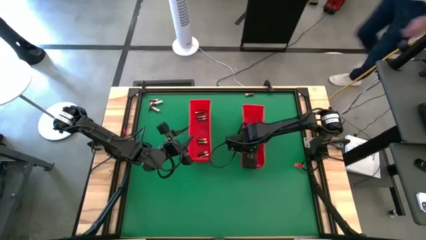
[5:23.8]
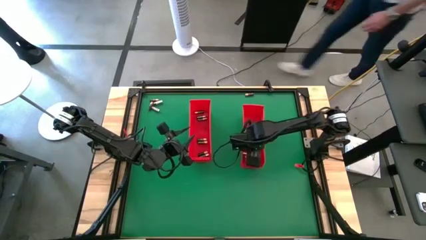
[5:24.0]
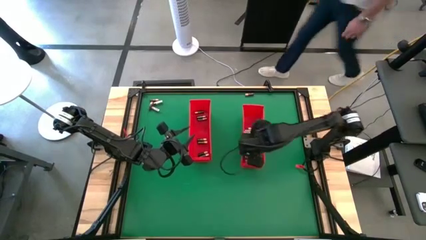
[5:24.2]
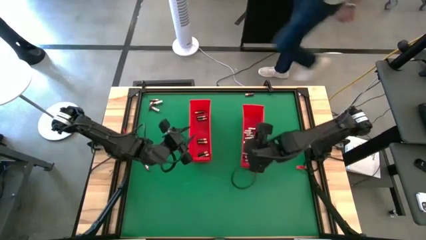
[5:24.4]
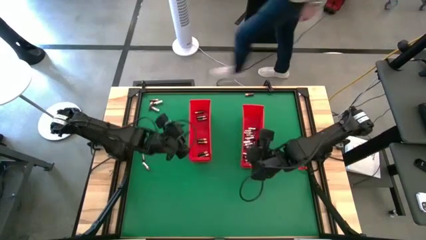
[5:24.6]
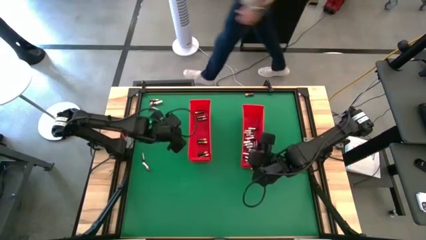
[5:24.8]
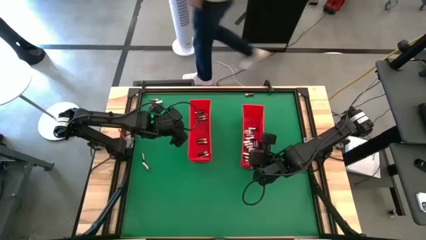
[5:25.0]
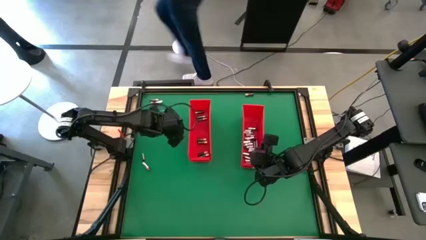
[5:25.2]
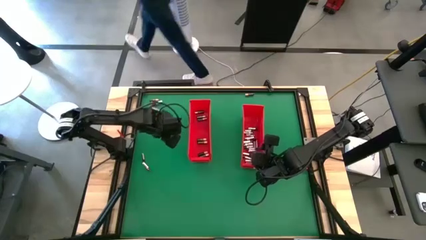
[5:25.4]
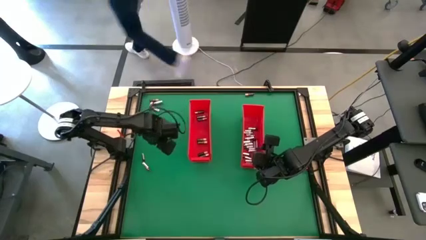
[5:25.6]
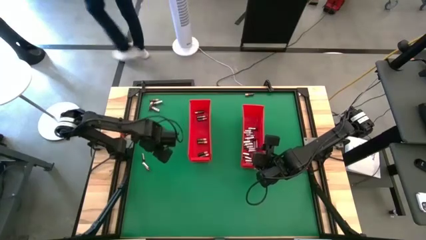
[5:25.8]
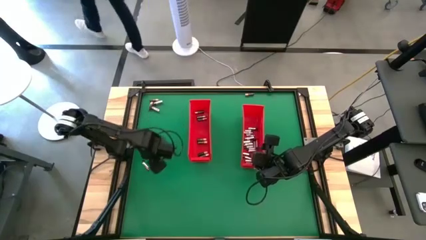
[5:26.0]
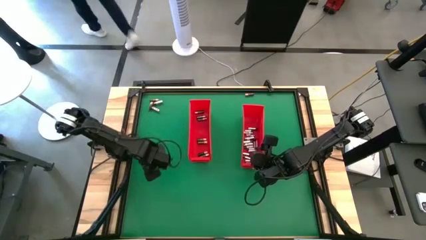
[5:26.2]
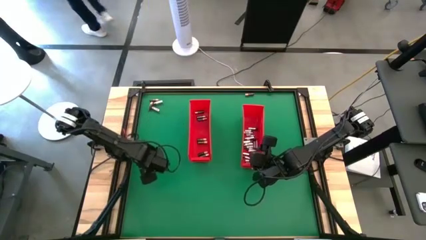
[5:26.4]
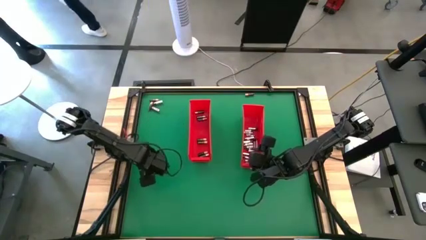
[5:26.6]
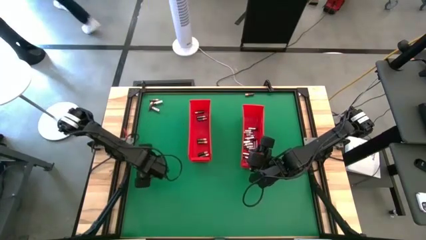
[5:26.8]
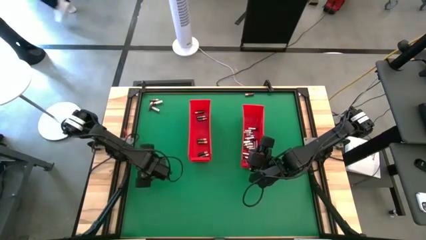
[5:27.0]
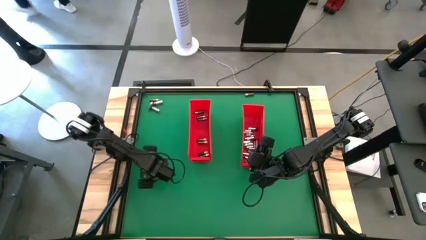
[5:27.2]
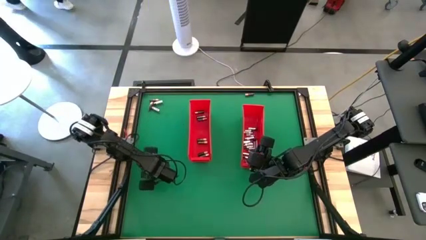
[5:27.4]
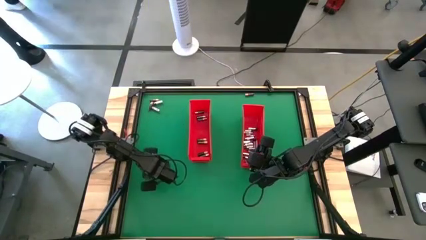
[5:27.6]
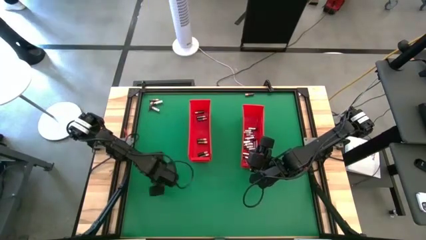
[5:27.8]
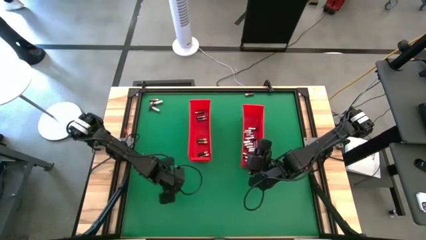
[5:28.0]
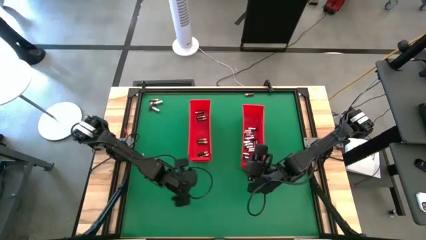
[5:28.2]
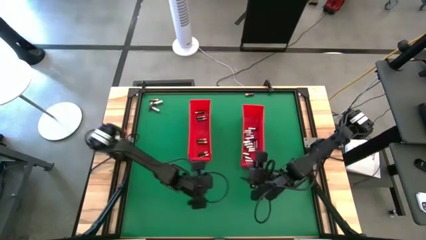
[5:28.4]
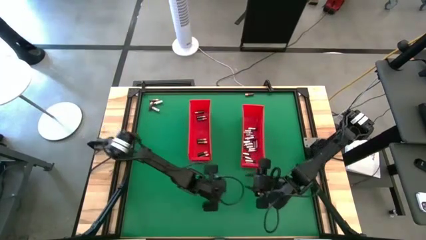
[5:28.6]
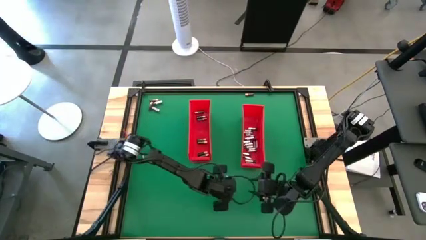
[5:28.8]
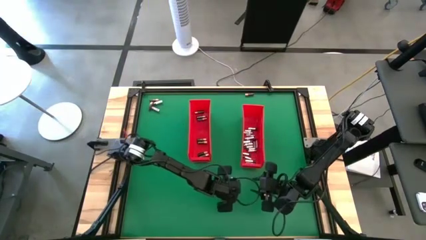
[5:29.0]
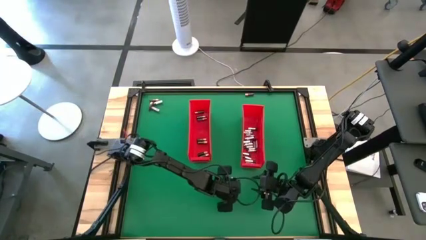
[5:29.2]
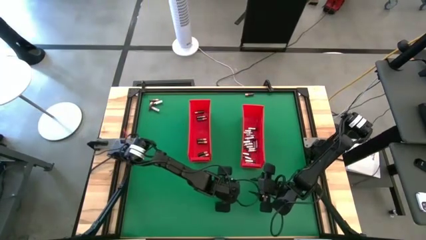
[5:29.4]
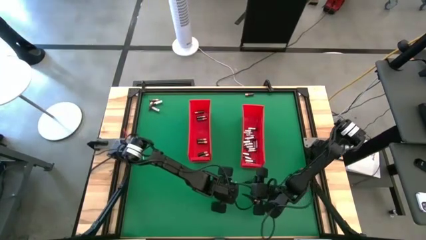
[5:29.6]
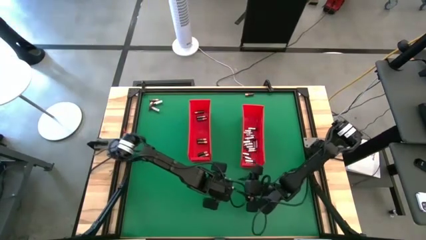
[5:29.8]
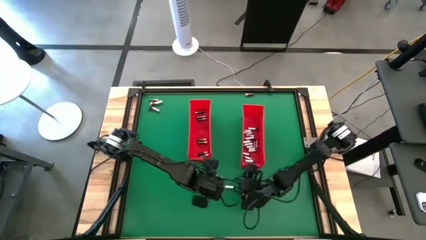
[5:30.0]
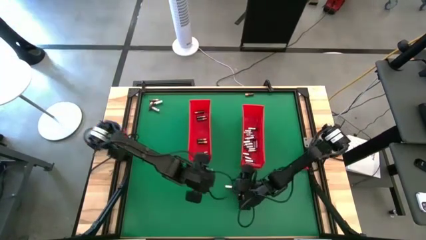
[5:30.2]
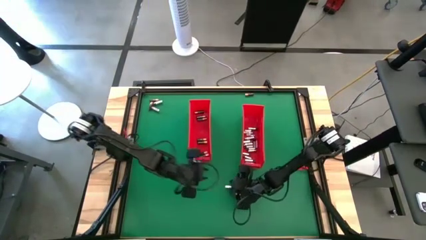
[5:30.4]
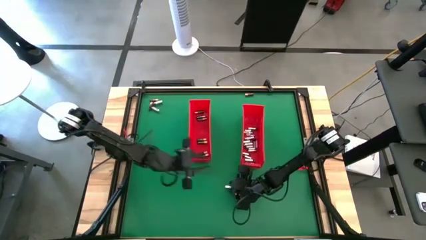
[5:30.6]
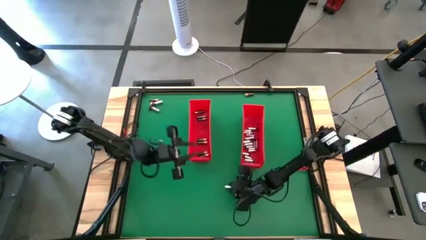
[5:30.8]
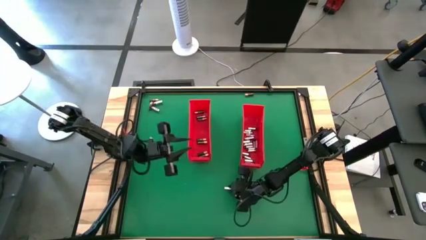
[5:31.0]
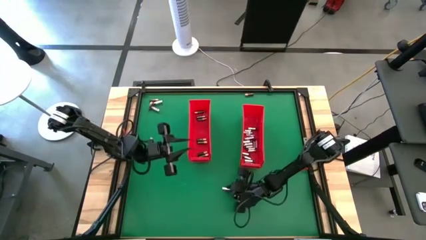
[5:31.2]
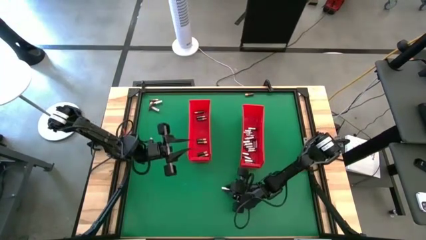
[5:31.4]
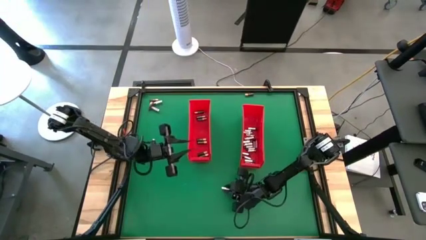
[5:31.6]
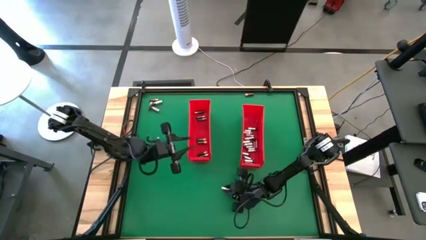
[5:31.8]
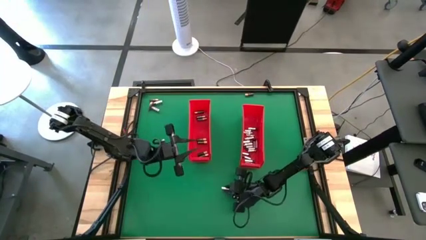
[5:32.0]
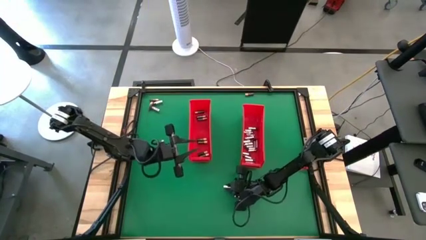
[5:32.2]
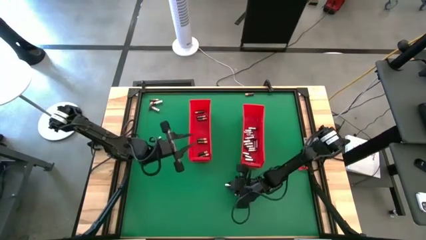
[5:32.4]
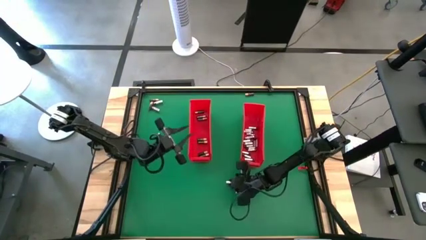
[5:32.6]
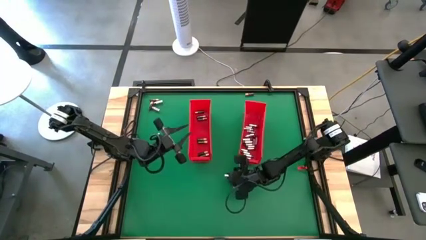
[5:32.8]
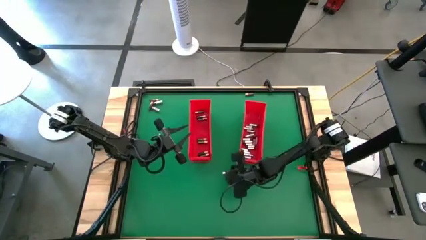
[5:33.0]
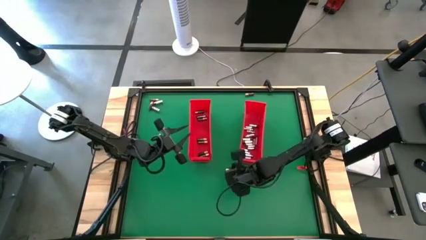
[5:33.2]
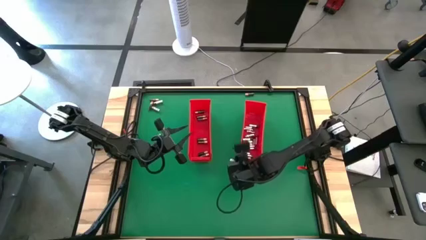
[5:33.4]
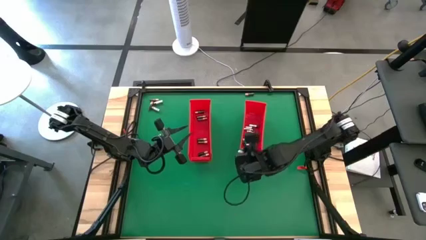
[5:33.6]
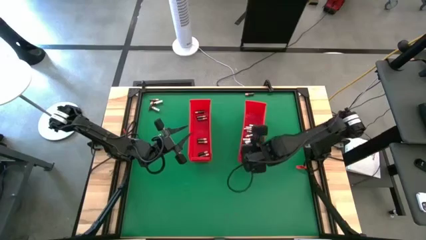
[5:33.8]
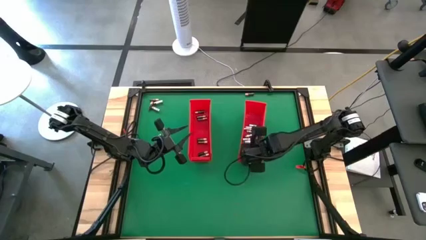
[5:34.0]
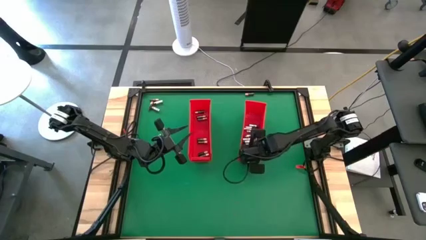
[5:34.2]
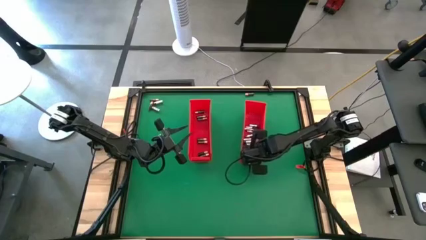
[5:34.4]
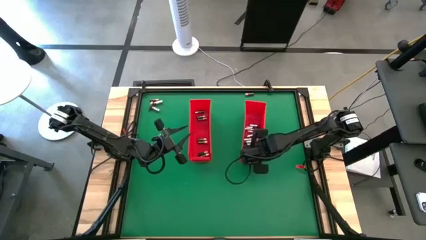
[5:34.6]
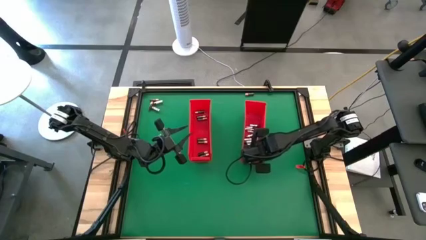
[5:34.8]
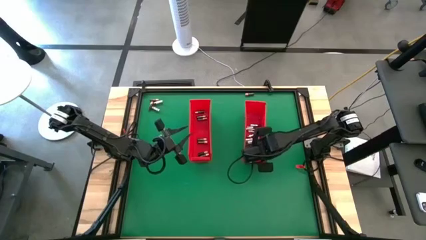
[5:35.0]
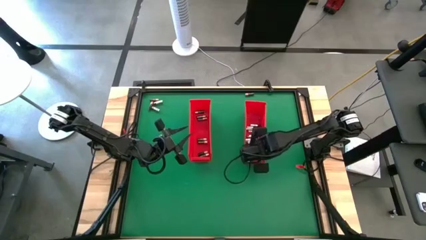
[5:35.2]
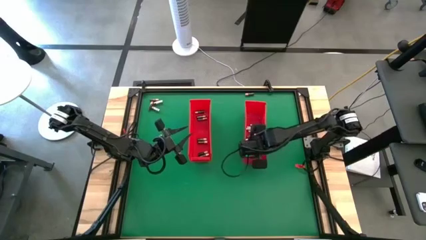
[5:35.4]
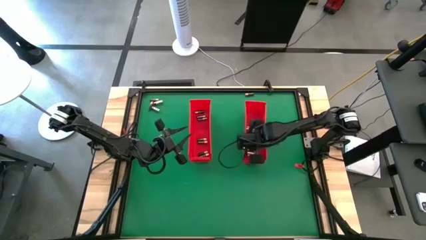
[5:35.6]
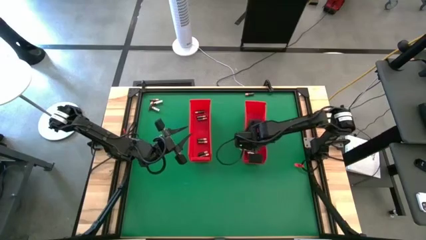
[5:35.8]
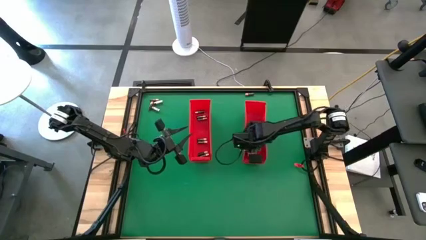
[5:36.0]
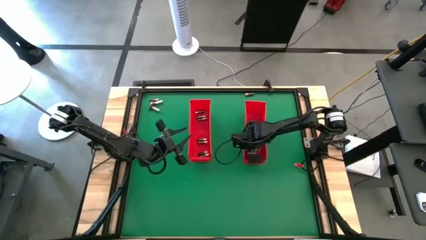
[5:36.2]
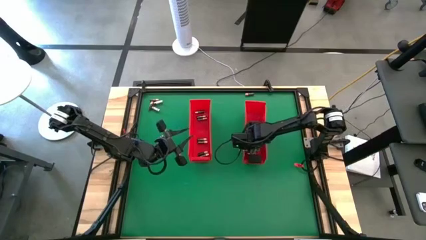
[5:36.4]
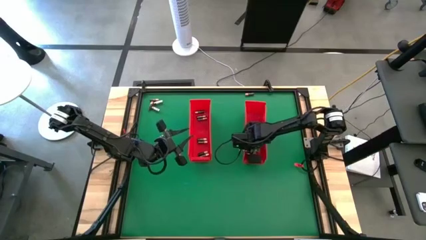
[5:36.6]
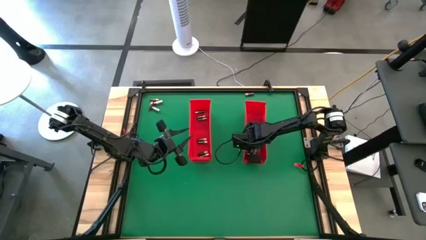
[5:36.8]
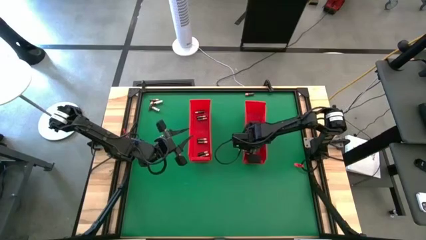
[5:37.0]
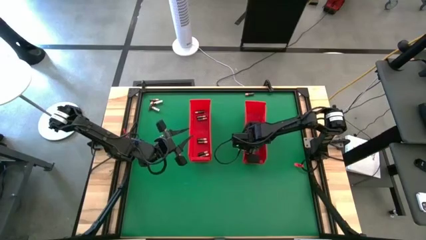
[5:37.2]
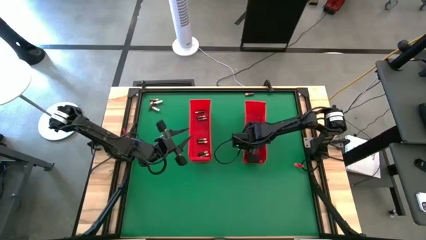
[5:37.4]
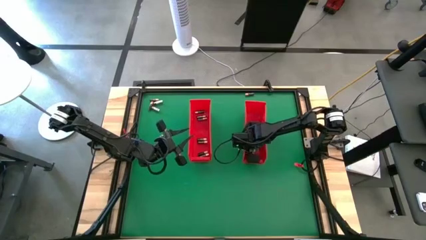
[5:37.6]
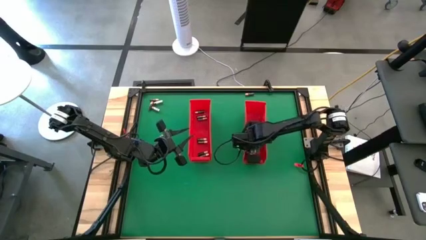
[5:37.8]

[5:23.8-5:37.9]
Task: Sort batteries
Put the silver battery into the right red bin
